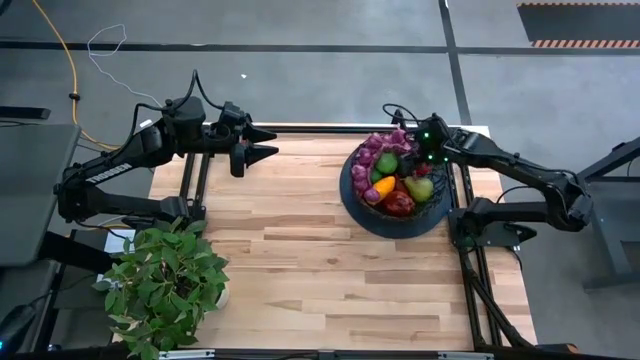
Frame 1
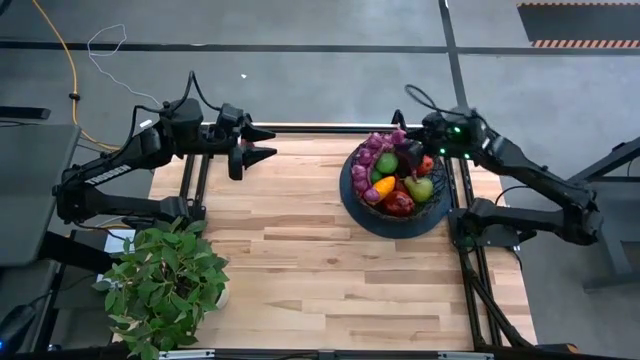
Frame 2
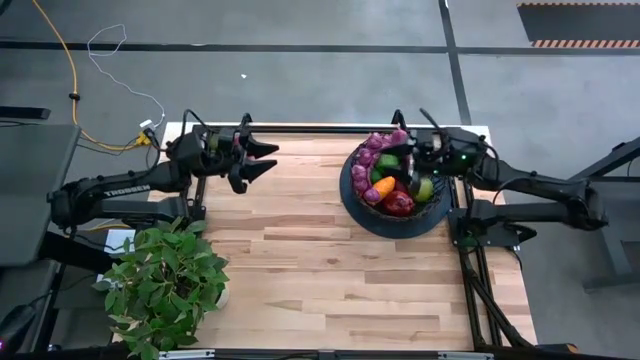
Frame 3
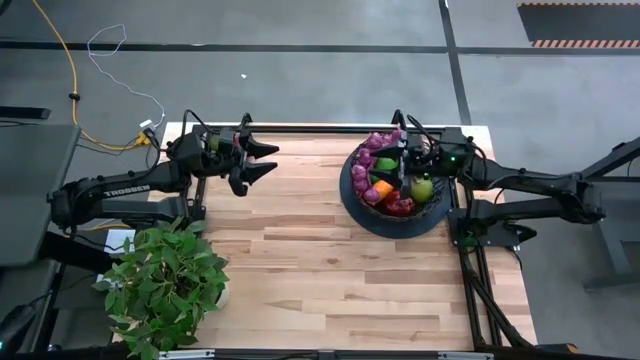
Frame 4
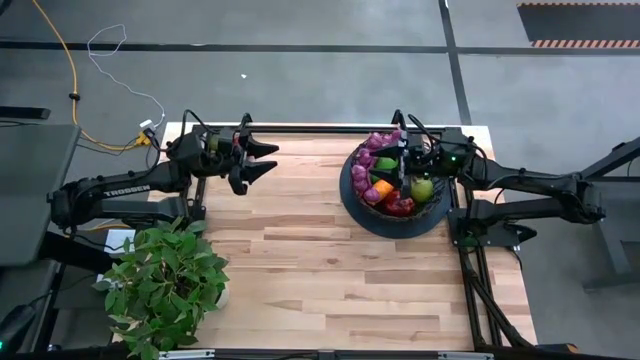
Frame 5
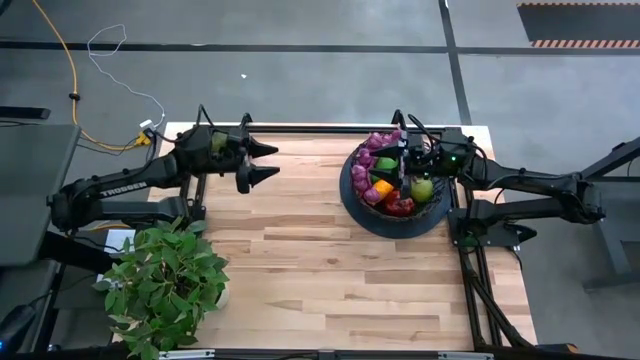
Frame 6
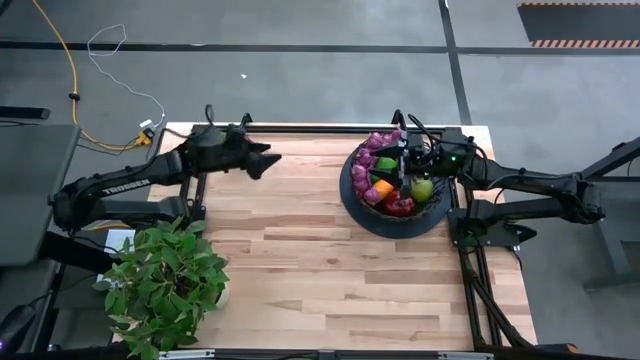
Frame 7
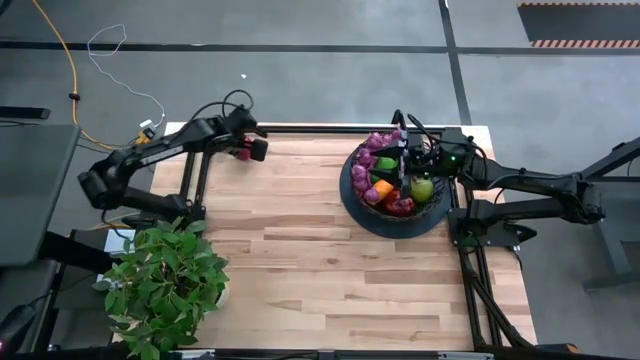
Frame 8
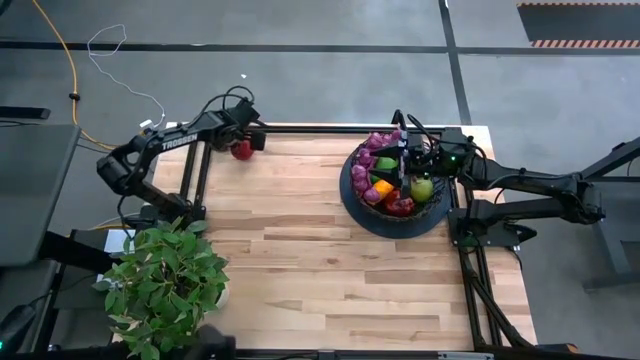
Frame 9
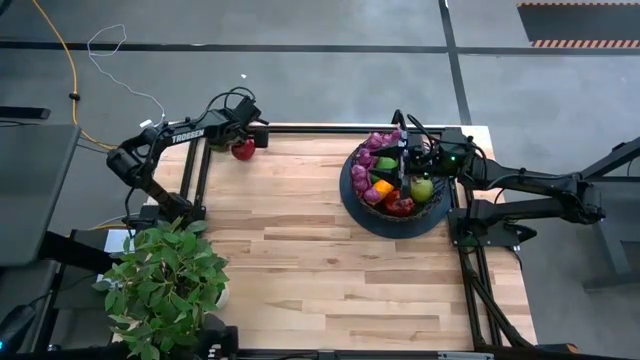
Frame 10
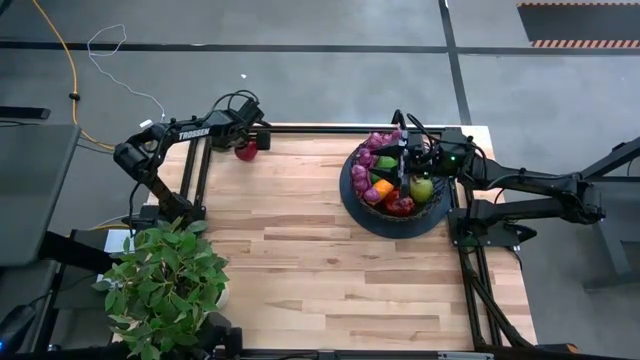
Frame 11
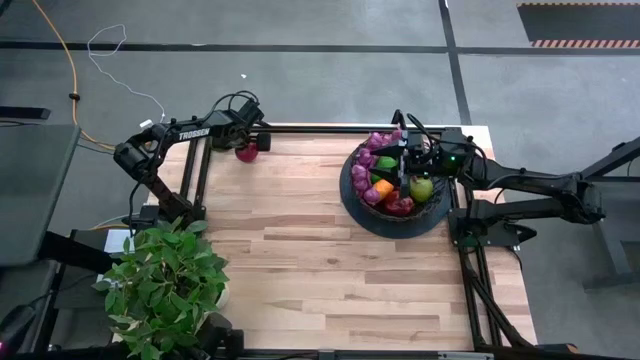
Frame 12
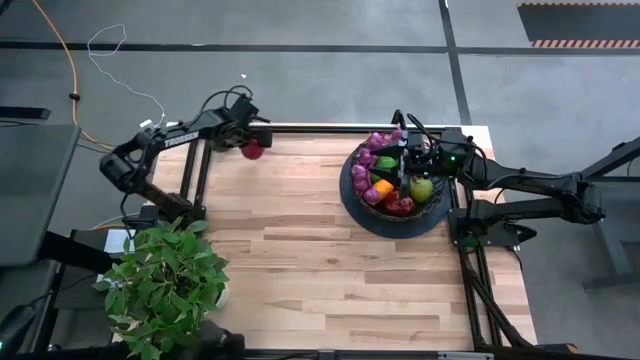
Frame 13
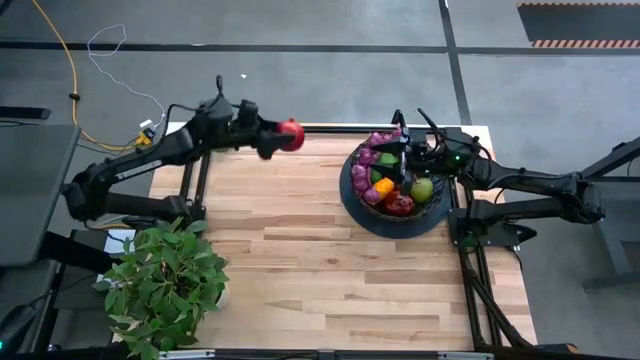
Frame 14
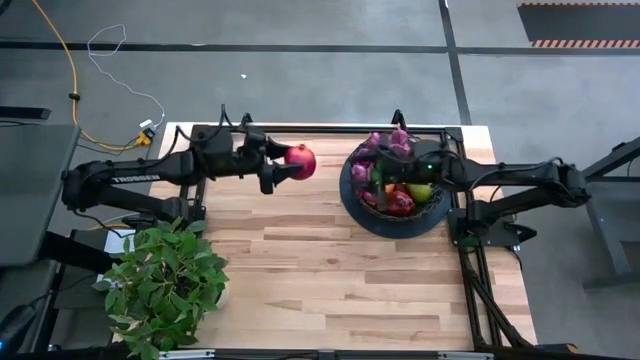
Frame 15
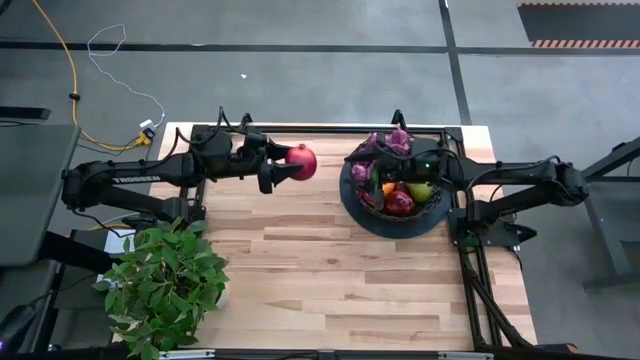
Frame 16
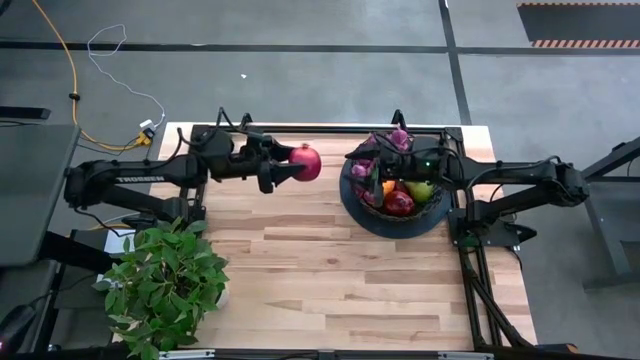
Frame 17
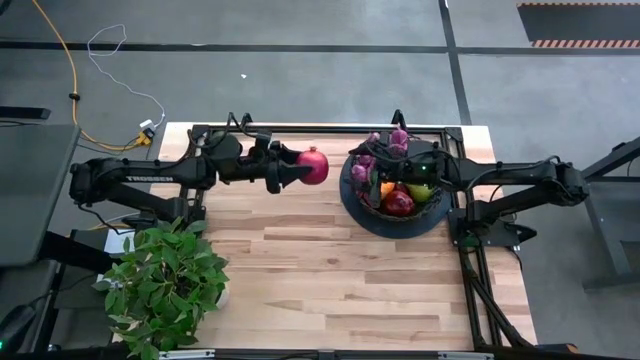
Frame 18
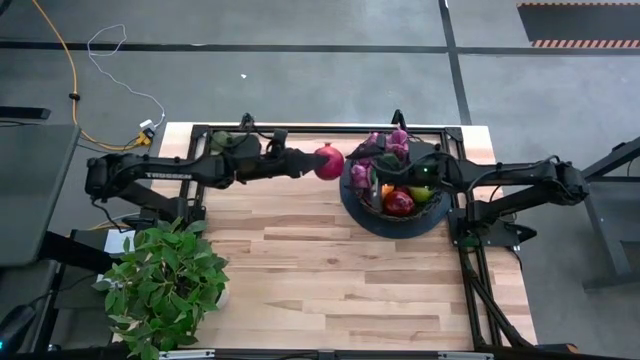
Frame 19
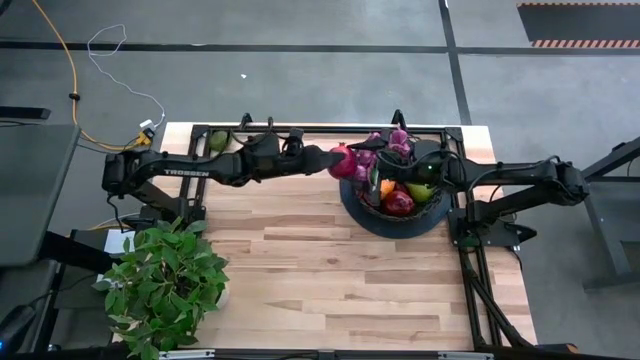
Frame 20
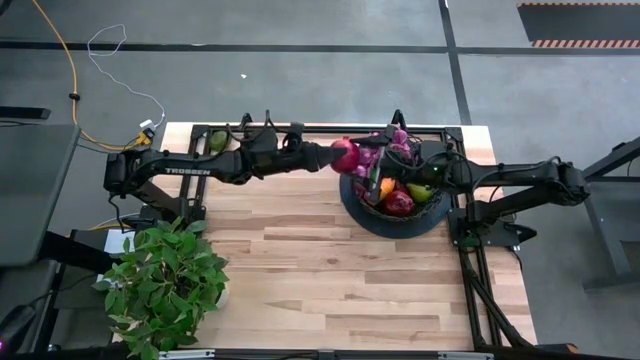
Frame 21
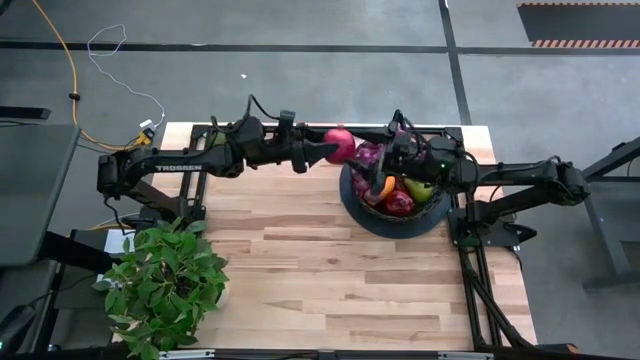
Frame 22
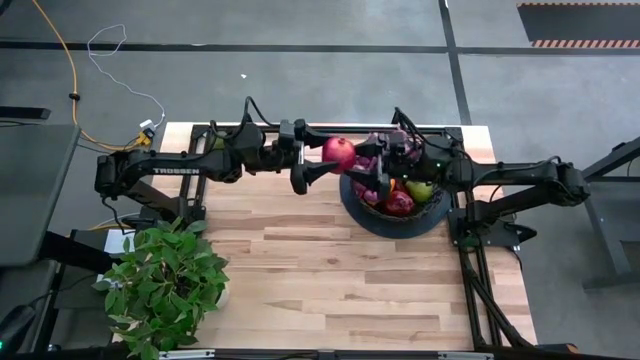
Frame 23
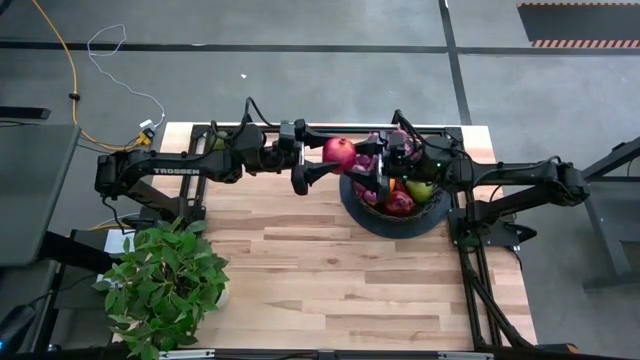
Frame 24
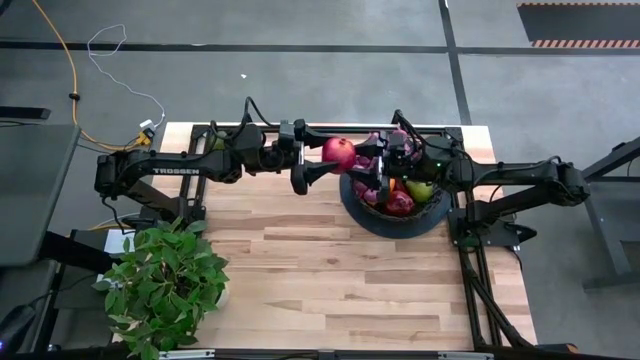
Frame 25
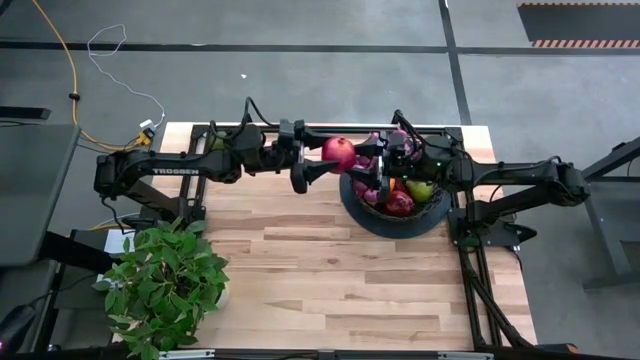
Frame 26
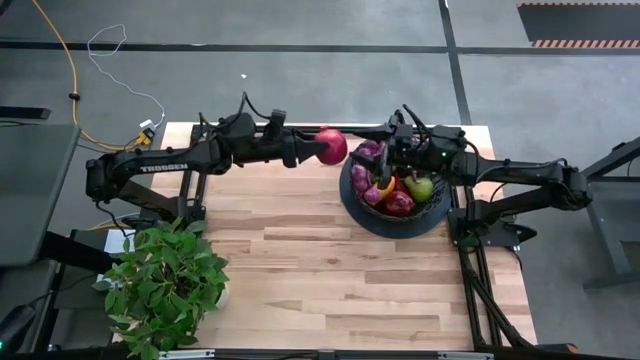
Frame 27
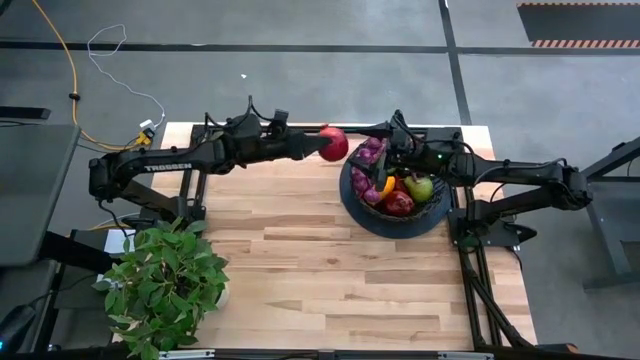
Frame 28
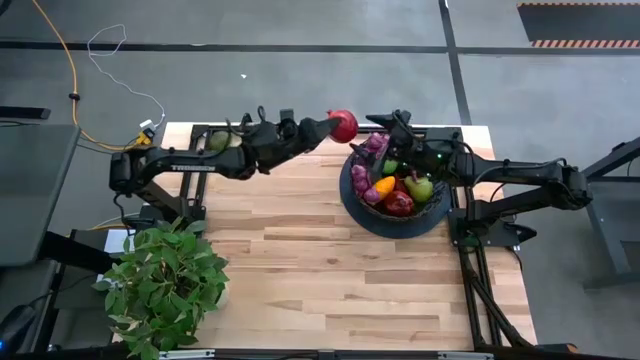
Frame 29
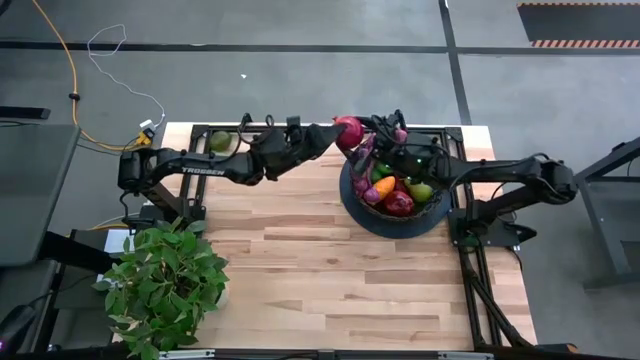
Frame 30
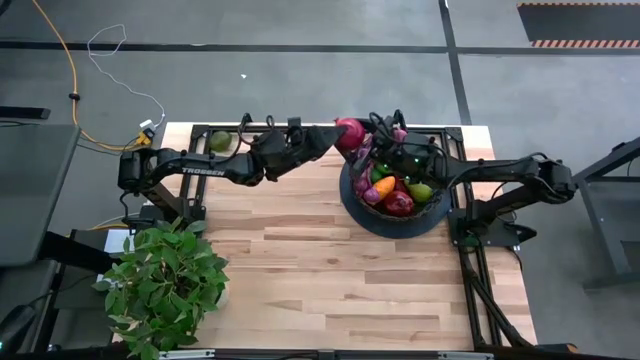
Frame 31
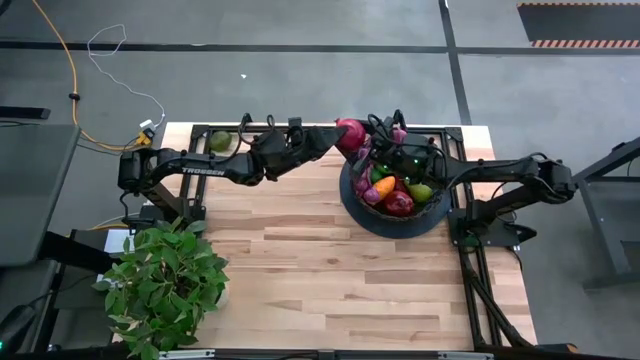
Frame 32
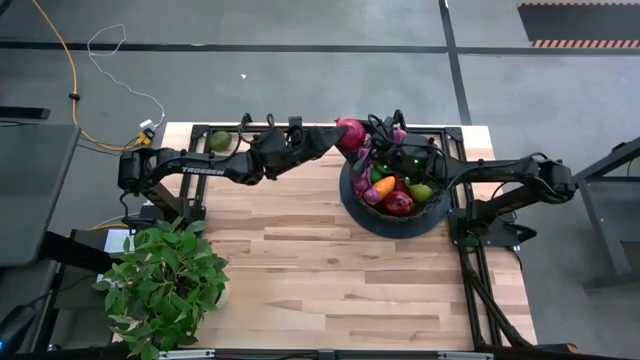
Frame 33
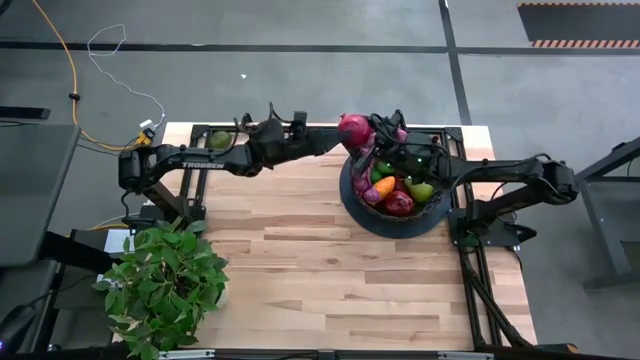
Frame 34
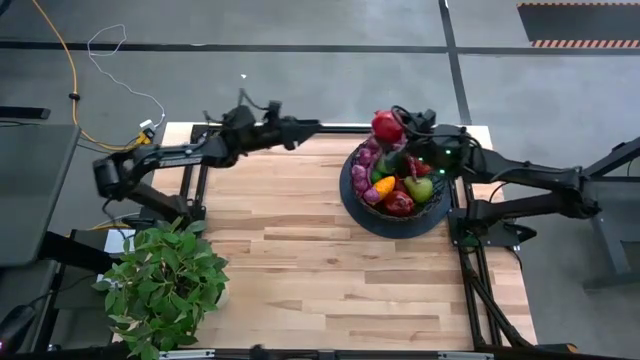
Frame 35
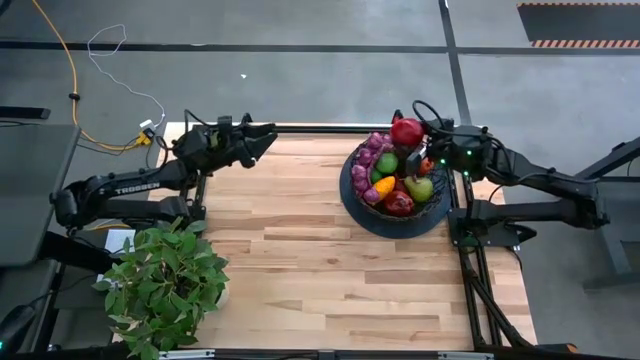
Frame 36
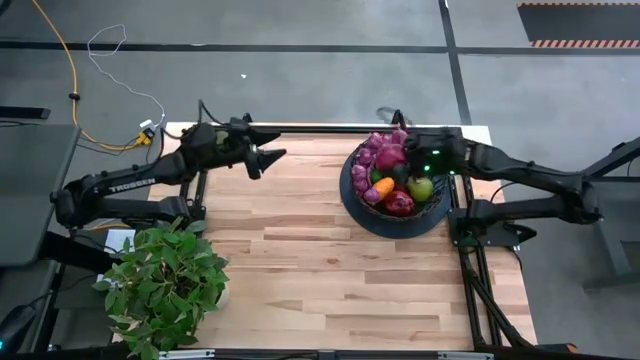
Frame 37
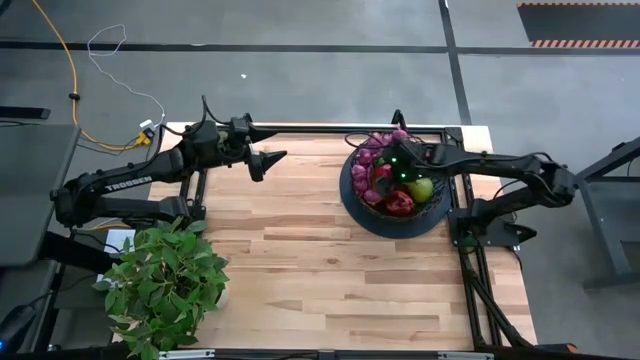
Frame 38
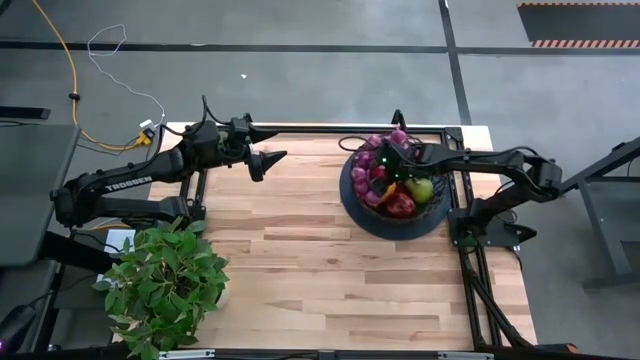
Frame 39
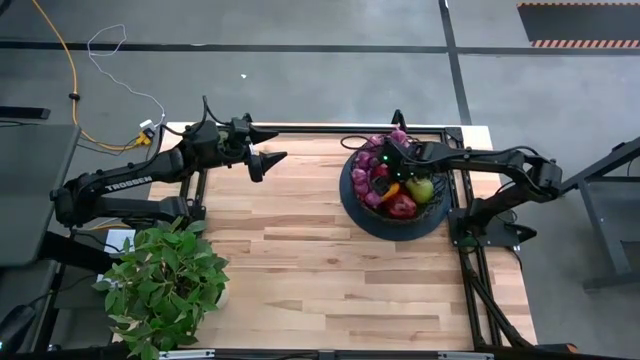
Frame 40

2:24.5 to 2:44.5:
Task: Build produce basket
Put the red pomegranate into the black wire basket

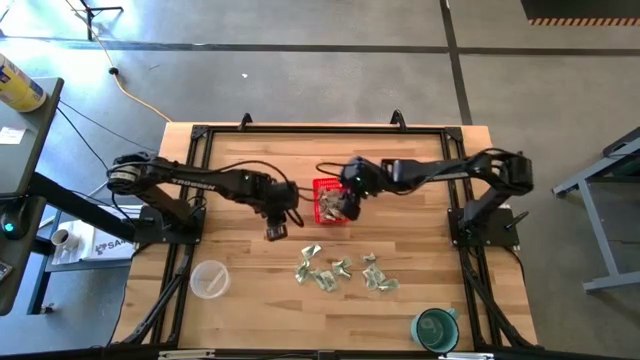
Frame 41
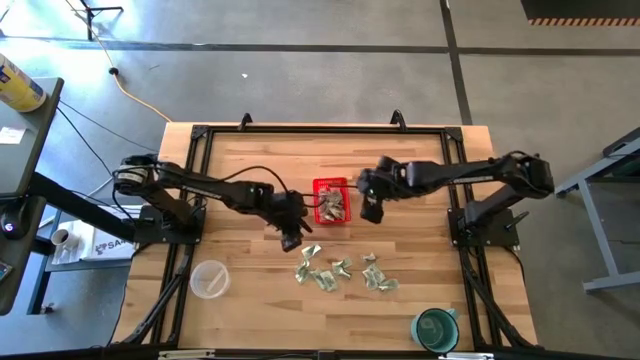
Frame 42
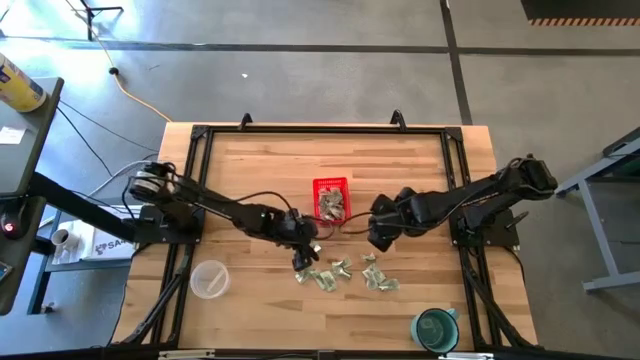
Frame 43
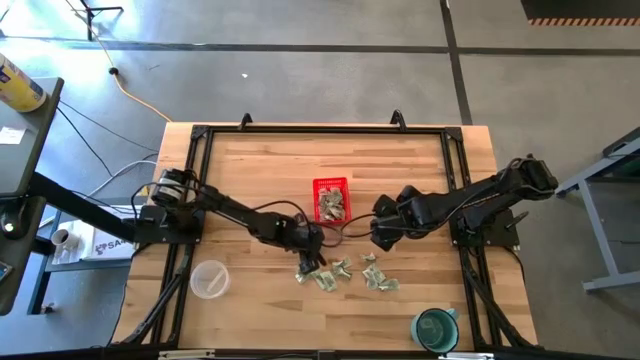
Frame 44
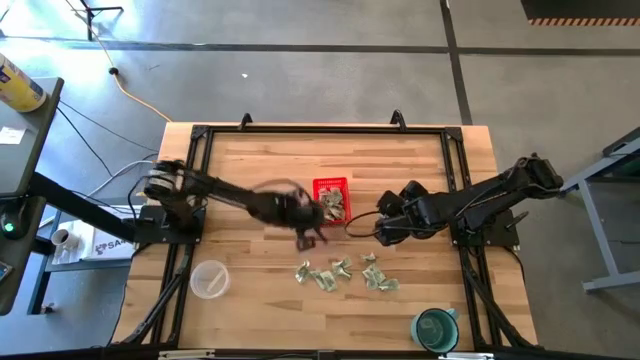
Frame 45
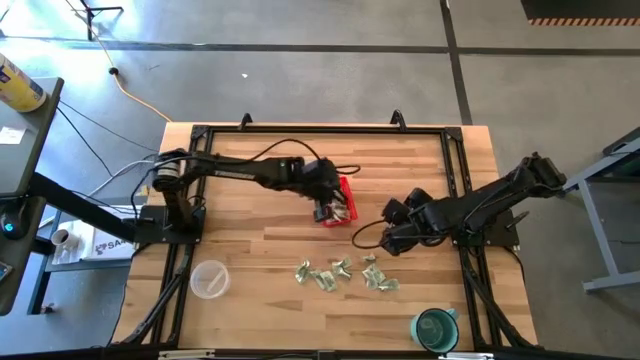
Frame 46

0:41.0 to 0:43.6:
Task: Pick and place items into bin
Put the light green stevia packet into the red bin
